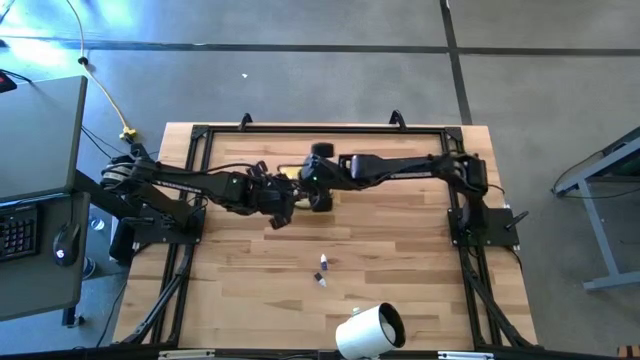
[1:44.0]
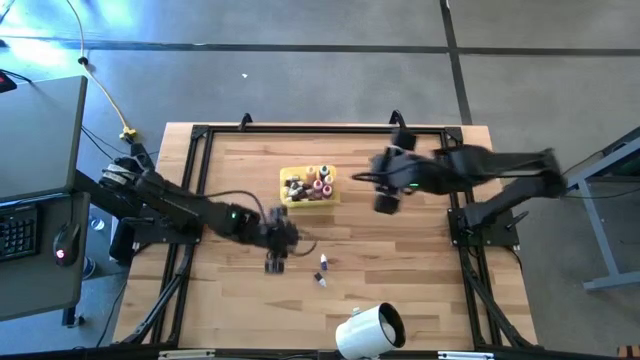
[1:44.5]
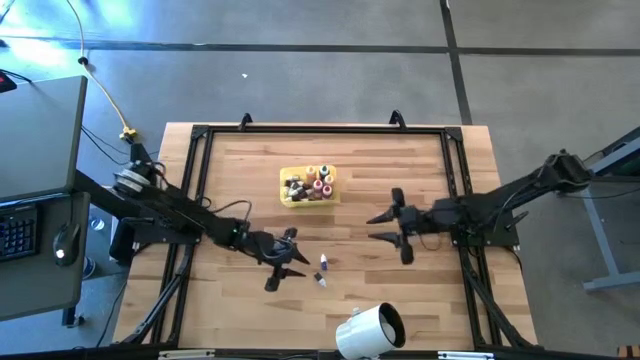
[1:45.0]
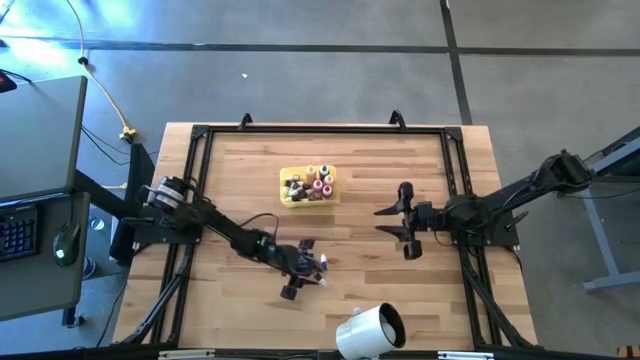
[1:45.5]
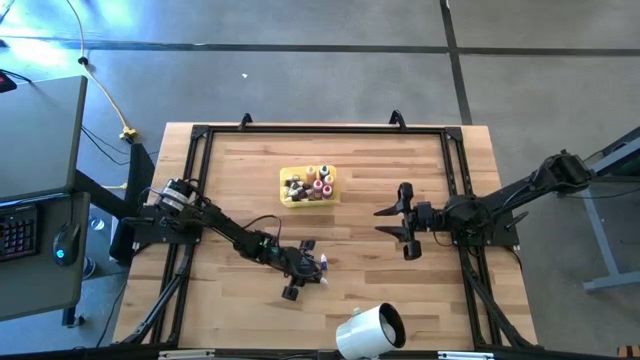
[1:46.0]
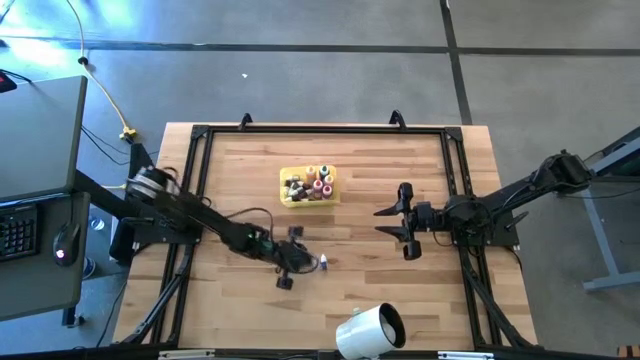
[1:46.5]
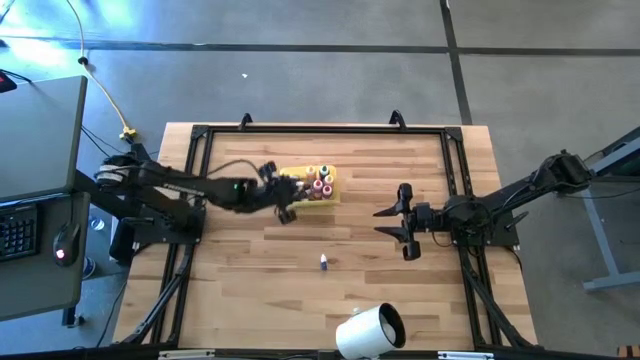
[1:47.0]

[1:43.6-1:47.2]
Task: Pick & Place food coloring
Put the small green food coloring bottle into the yellow container

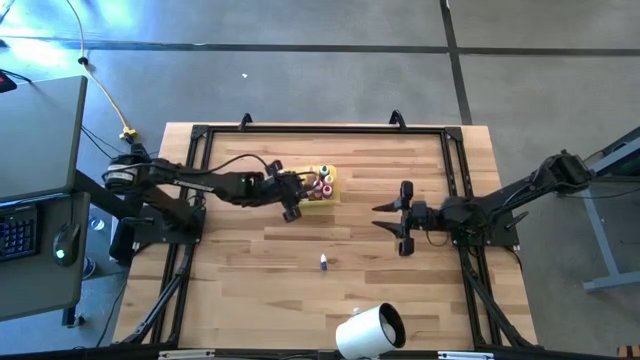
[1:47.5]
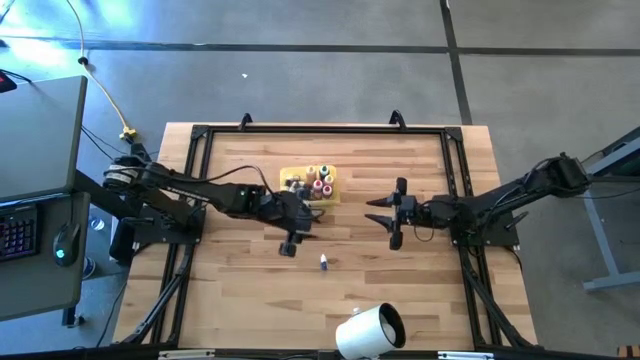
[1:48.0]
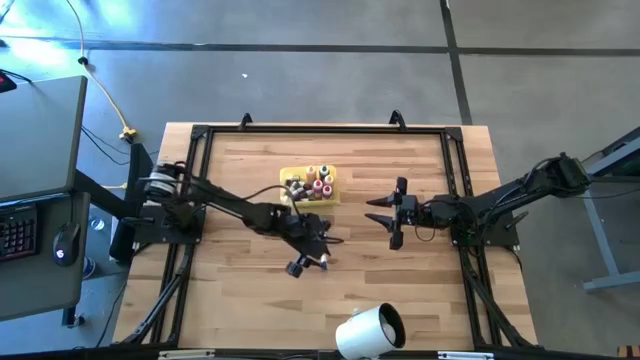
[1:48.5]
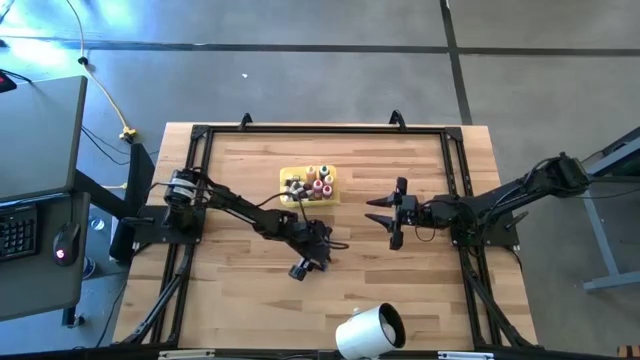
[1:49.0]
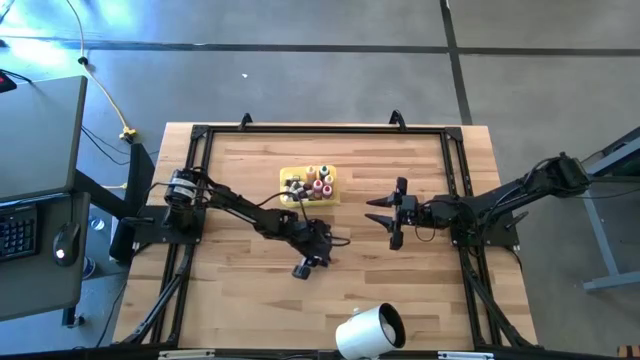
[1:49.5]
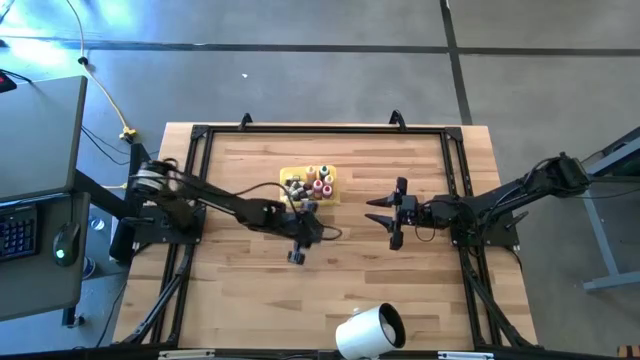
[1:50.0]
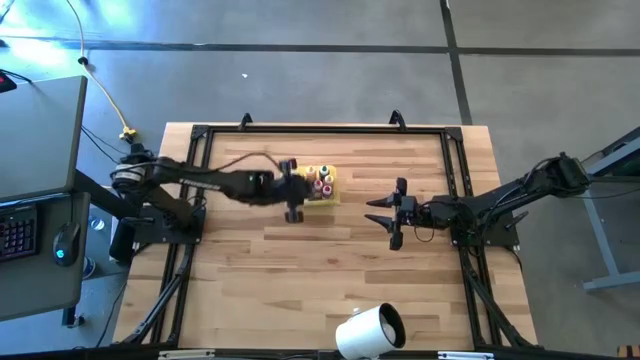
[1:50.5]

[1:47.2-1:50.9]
Put the small dark blue food coloring bottle into the yellow container

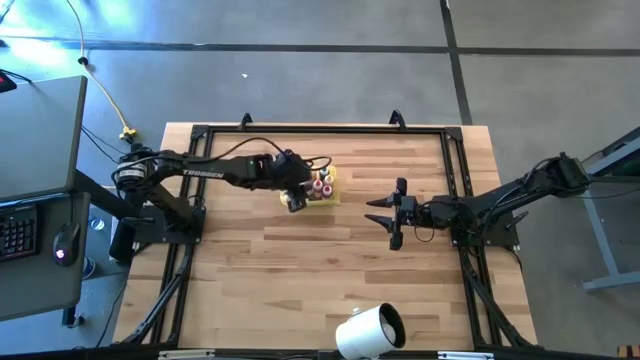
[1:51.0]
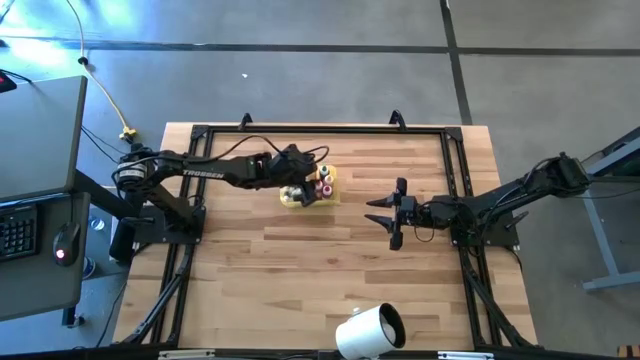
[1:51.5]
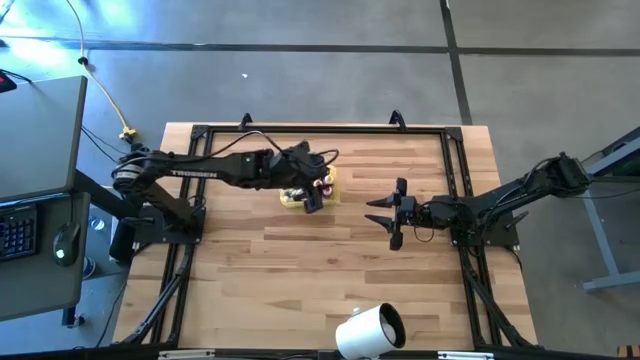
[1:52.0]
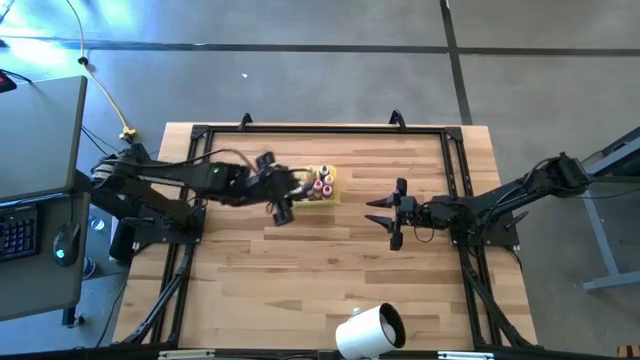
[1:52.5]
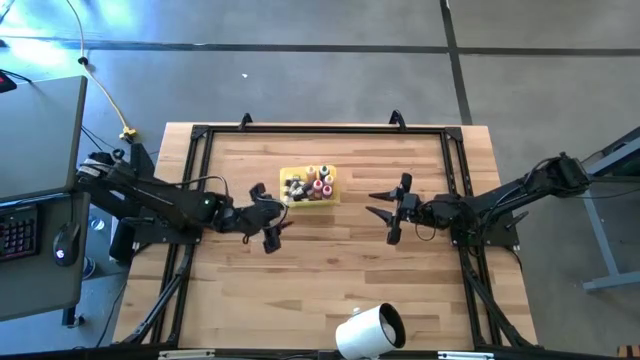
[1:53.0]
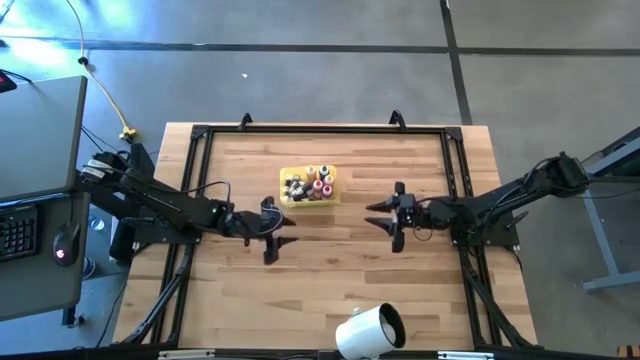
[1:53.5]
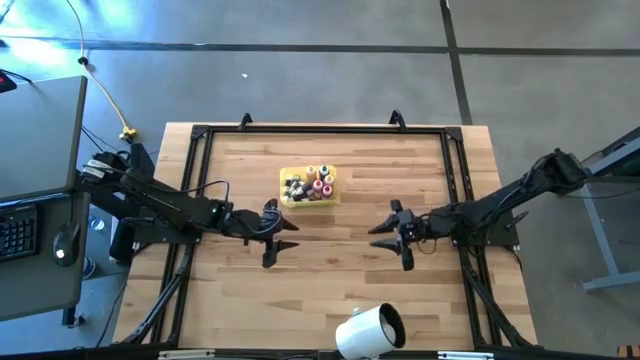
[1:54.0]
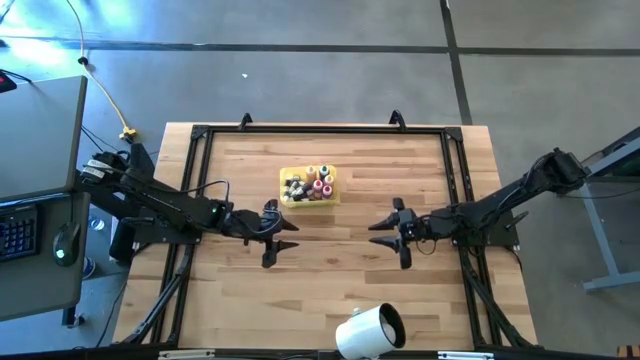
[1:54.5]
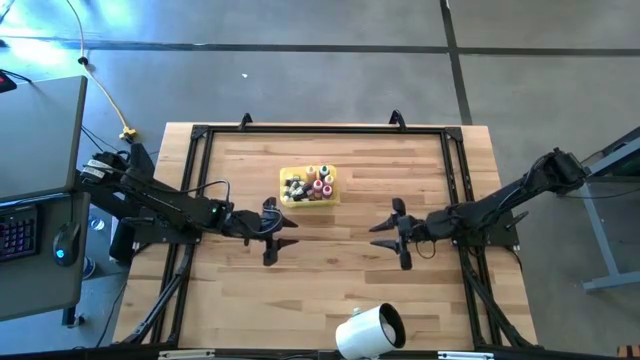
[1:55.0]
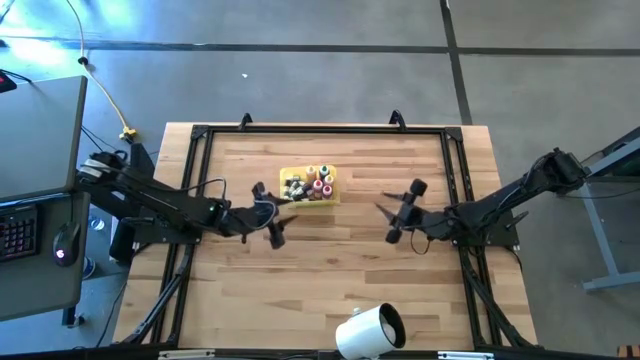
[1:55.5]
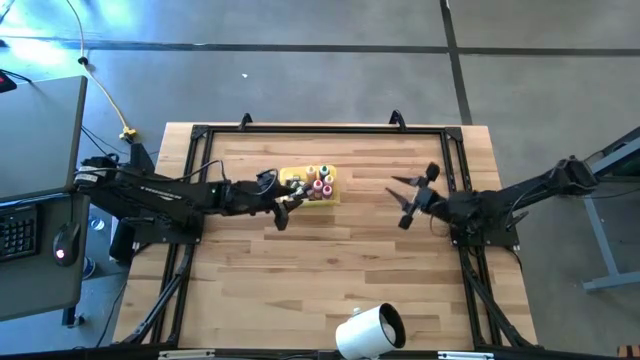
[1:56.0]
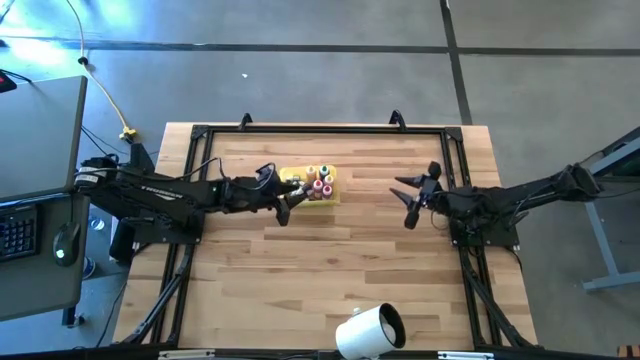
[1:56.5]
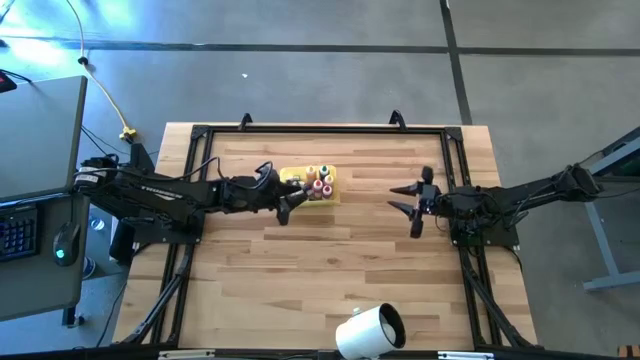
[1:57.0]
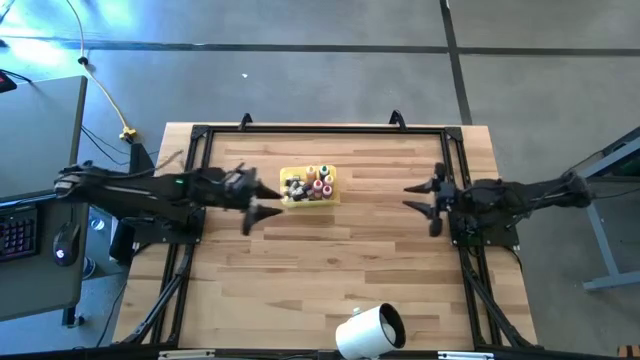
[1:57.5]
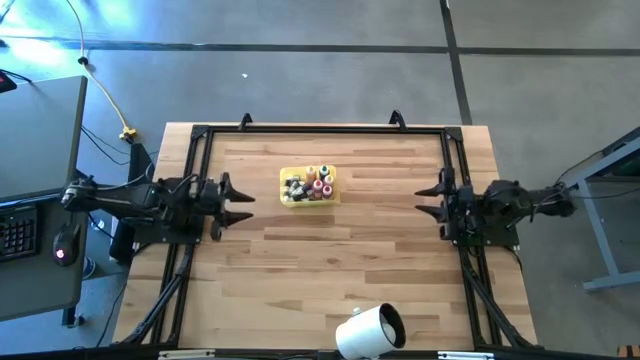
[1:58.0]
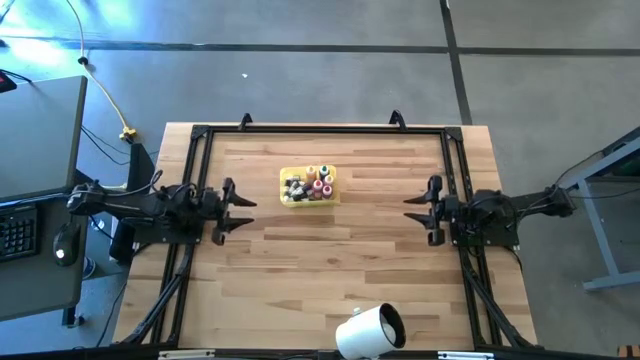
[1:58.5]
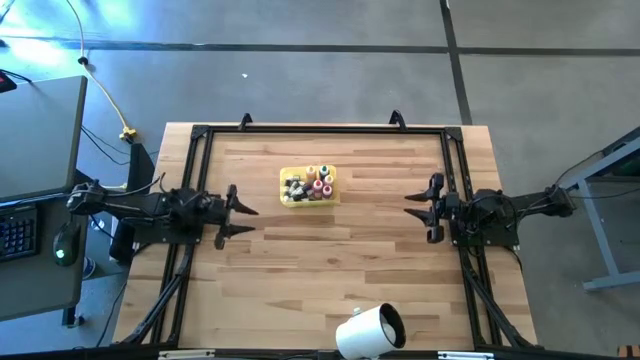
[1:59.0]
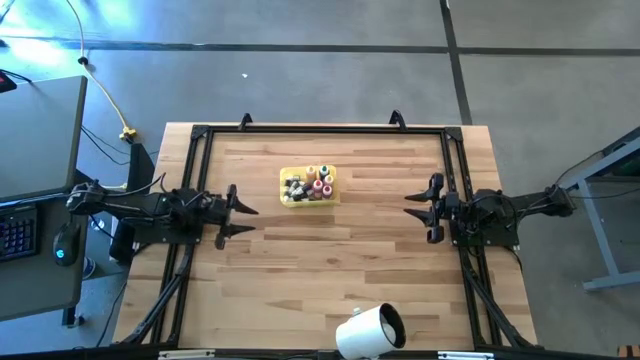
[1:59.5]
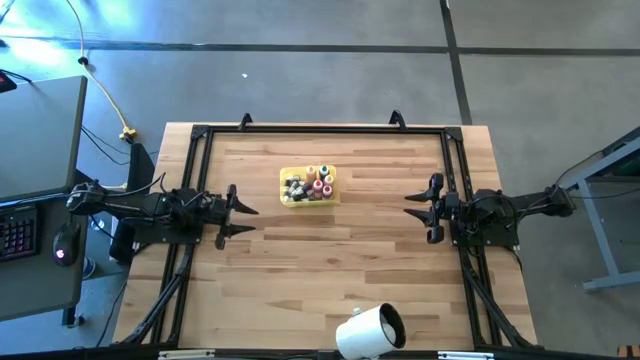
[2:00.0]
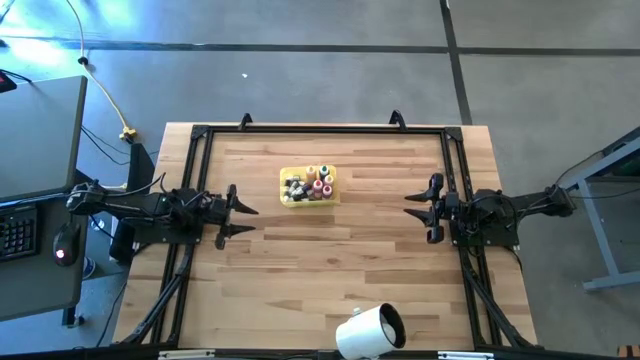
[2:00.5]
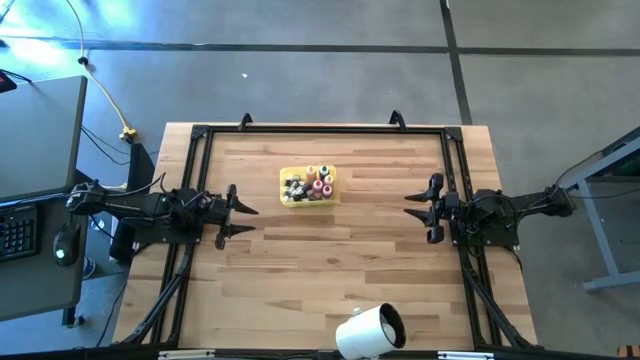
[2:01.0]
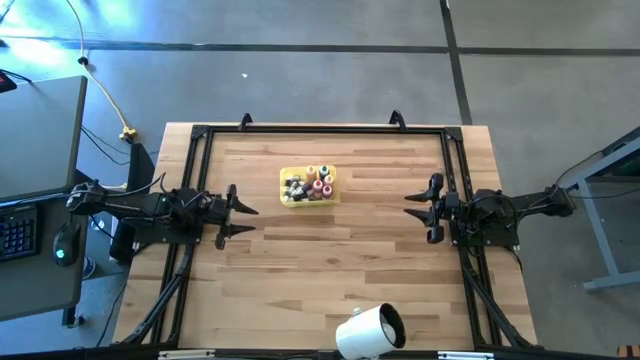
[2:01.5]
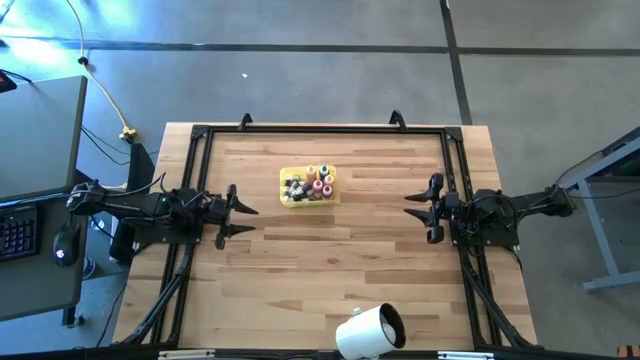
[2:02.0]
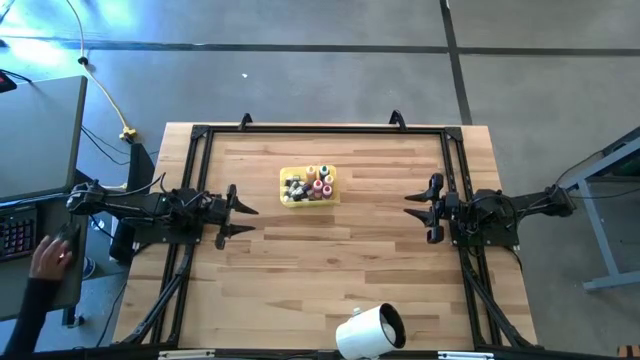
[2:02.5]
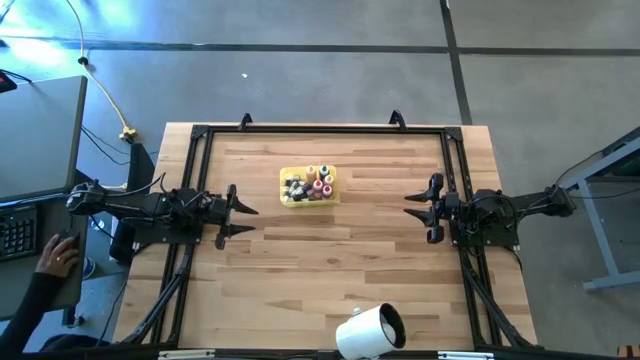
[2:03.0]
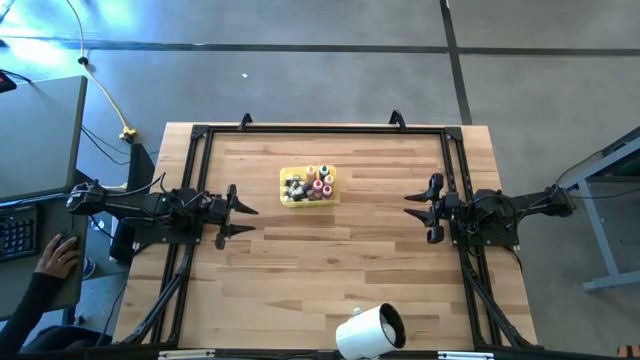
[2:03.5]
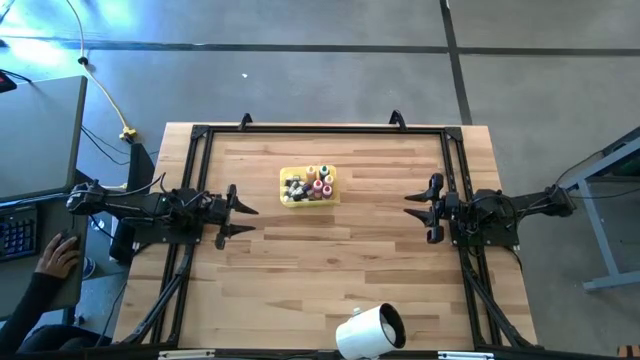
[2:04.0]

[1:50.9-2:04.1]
Return to Home Position
